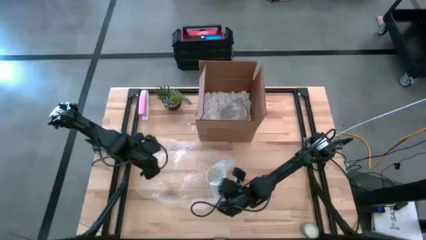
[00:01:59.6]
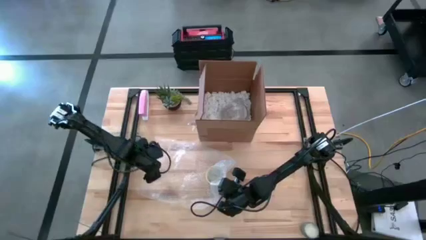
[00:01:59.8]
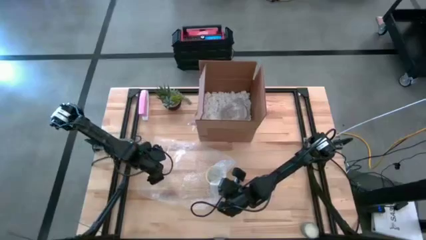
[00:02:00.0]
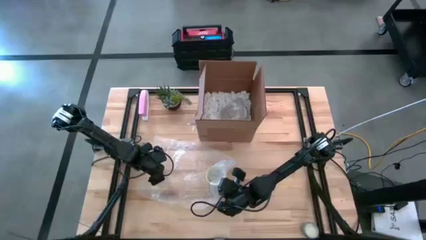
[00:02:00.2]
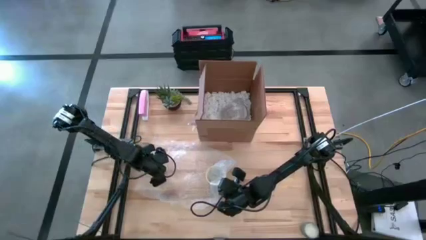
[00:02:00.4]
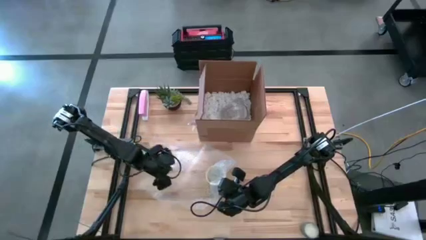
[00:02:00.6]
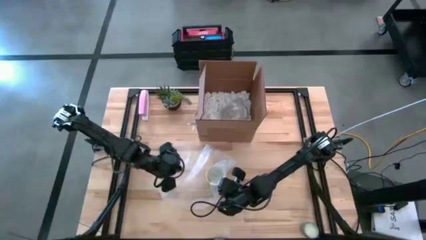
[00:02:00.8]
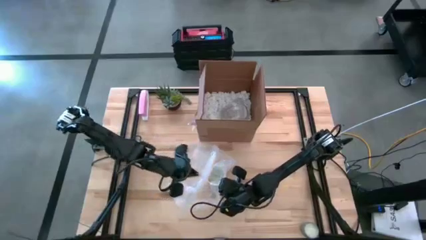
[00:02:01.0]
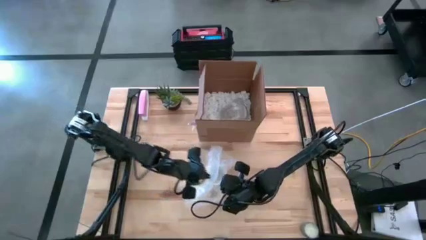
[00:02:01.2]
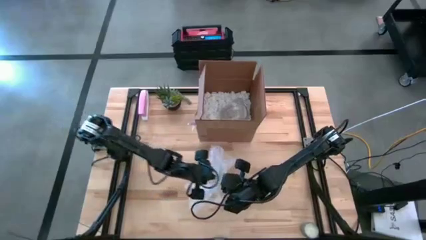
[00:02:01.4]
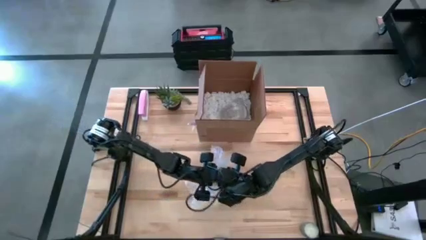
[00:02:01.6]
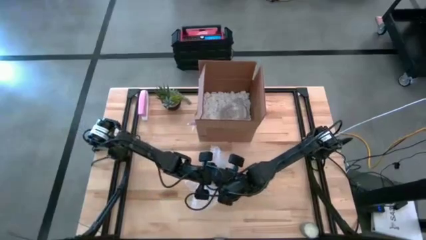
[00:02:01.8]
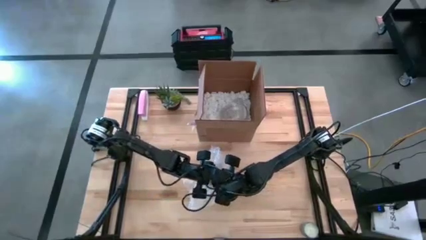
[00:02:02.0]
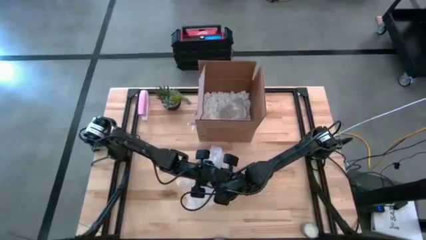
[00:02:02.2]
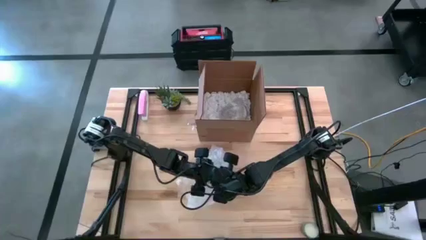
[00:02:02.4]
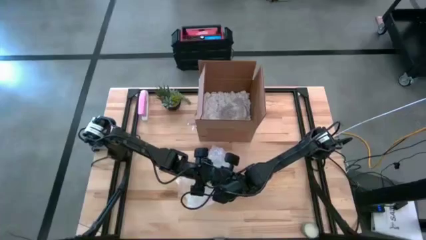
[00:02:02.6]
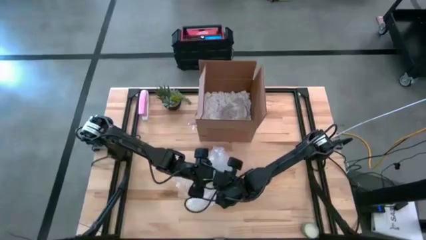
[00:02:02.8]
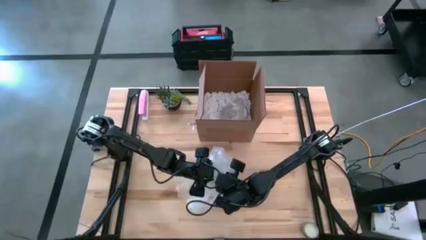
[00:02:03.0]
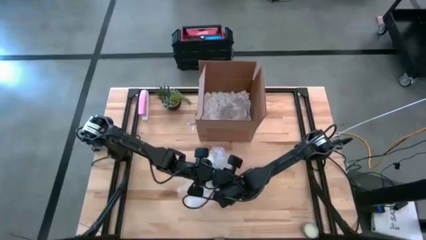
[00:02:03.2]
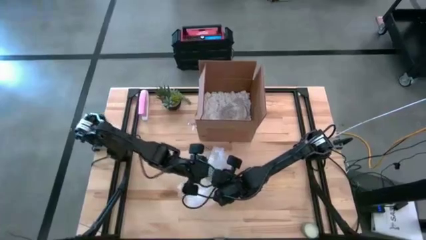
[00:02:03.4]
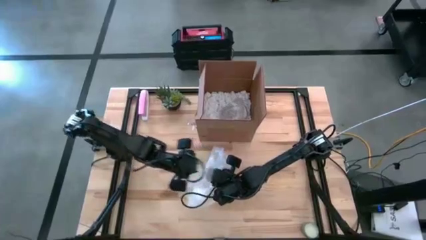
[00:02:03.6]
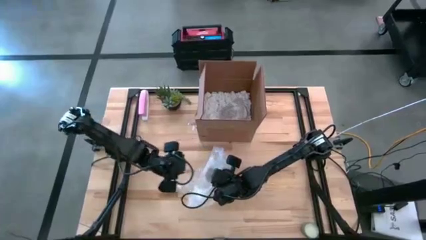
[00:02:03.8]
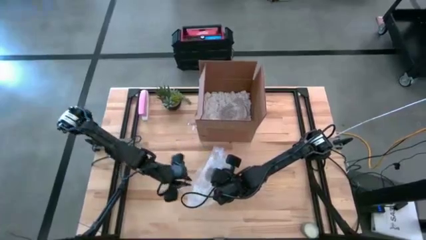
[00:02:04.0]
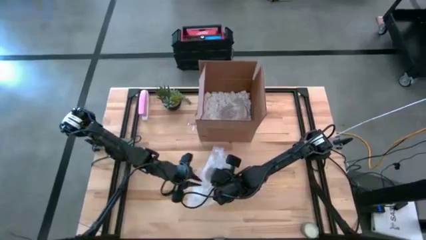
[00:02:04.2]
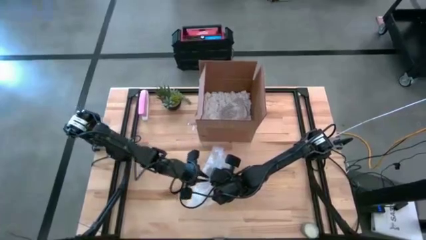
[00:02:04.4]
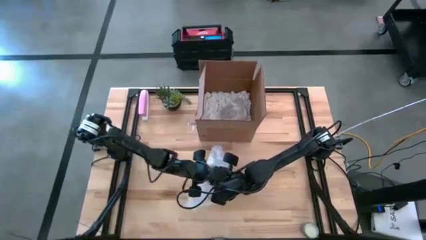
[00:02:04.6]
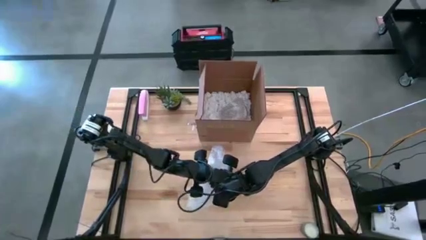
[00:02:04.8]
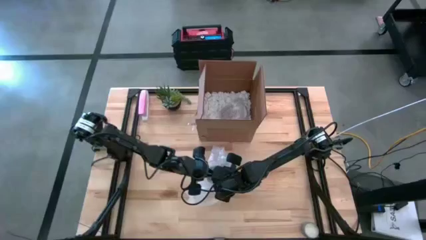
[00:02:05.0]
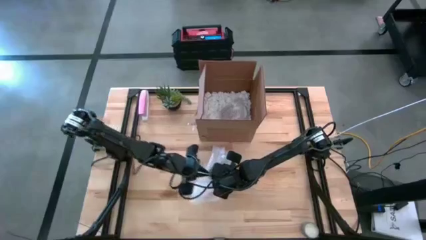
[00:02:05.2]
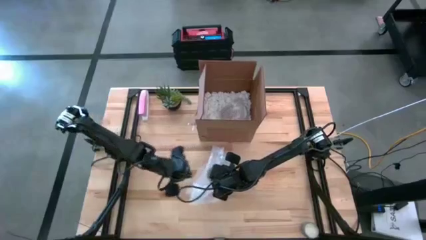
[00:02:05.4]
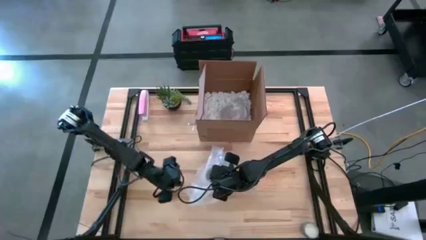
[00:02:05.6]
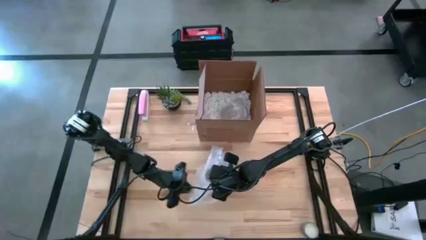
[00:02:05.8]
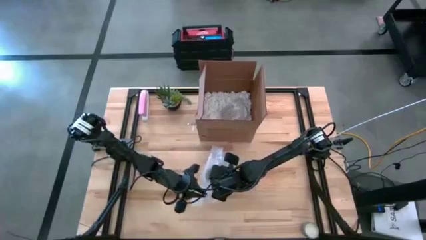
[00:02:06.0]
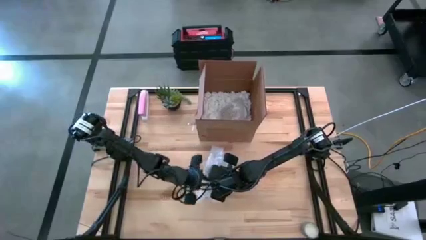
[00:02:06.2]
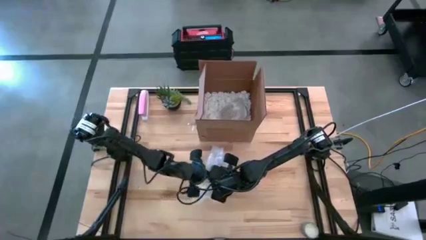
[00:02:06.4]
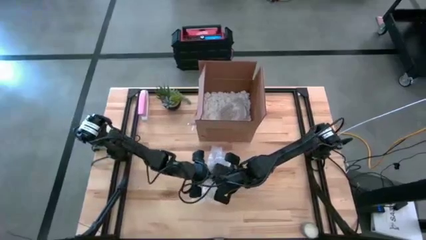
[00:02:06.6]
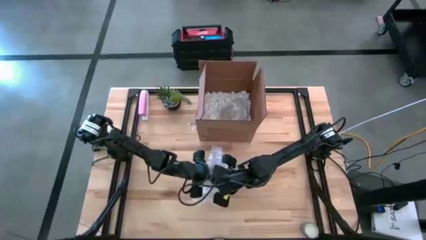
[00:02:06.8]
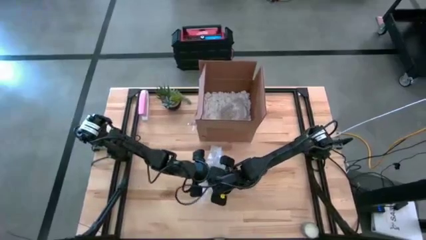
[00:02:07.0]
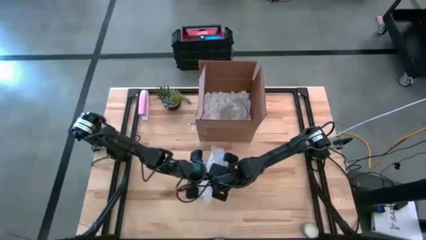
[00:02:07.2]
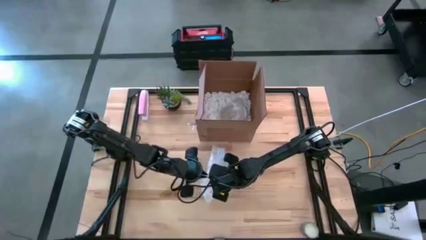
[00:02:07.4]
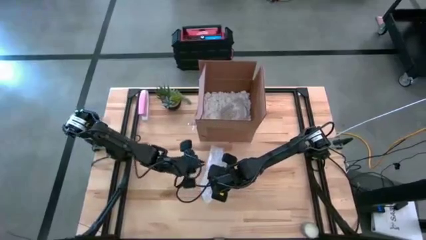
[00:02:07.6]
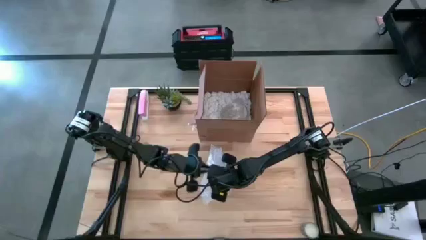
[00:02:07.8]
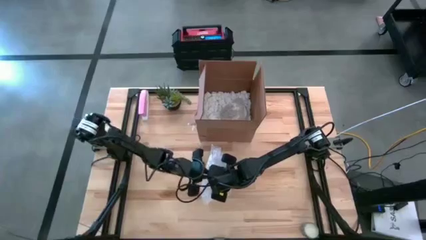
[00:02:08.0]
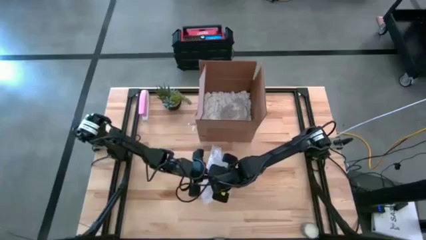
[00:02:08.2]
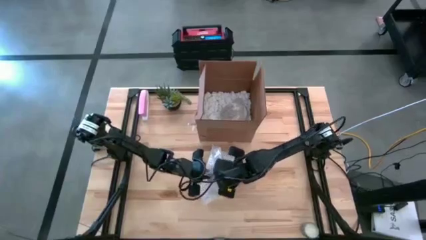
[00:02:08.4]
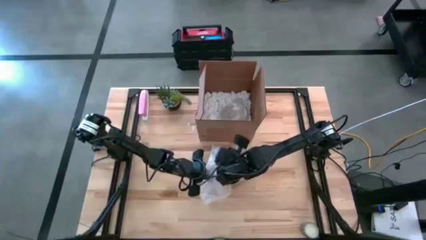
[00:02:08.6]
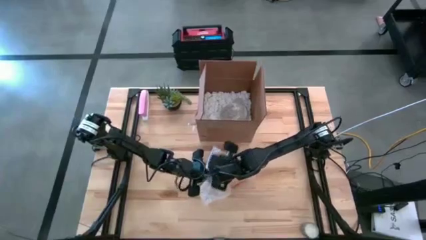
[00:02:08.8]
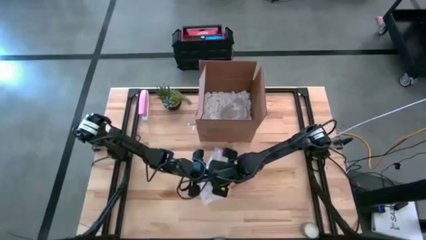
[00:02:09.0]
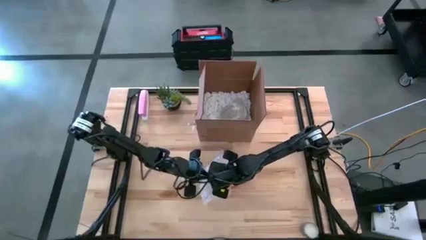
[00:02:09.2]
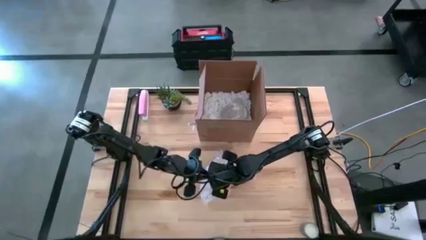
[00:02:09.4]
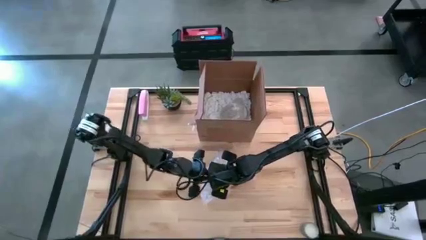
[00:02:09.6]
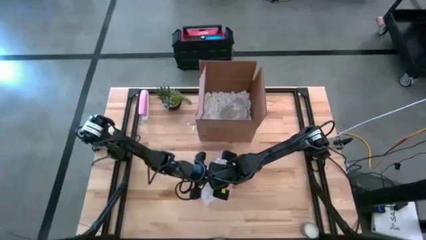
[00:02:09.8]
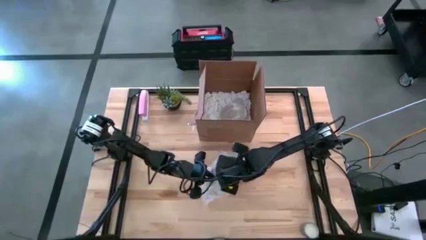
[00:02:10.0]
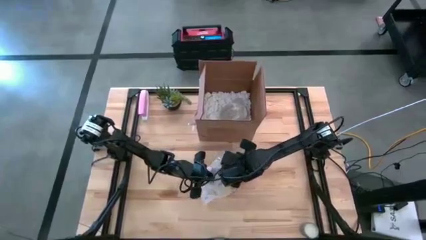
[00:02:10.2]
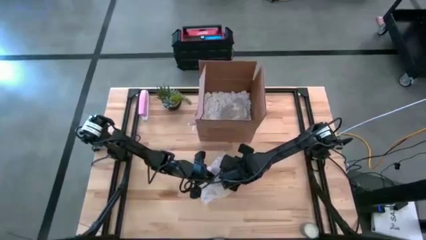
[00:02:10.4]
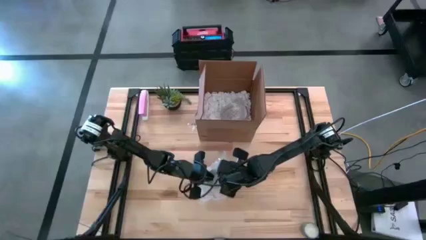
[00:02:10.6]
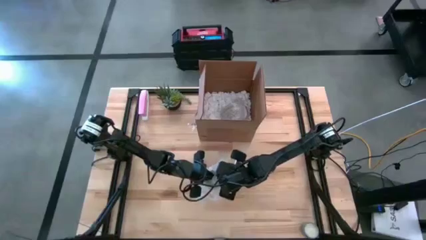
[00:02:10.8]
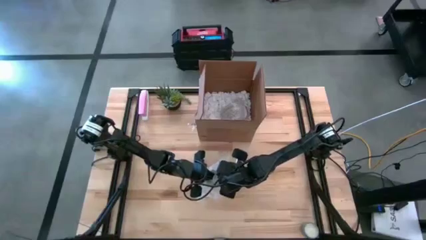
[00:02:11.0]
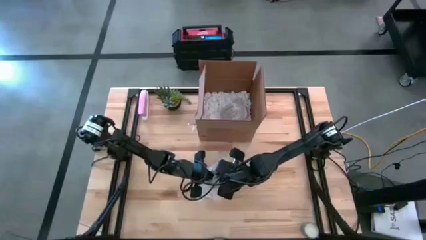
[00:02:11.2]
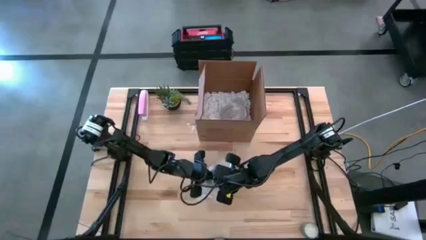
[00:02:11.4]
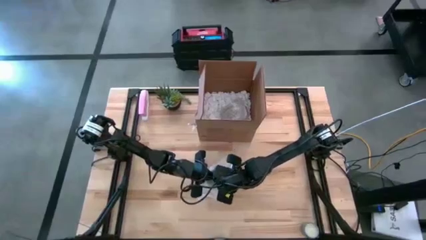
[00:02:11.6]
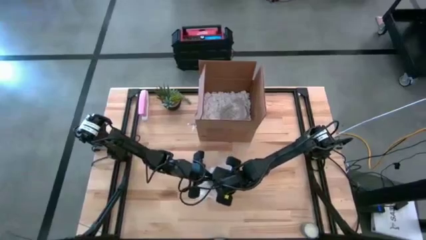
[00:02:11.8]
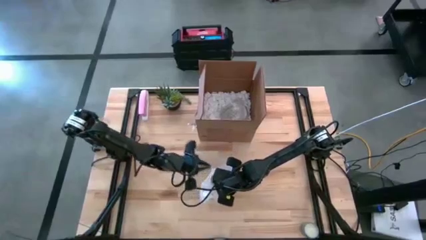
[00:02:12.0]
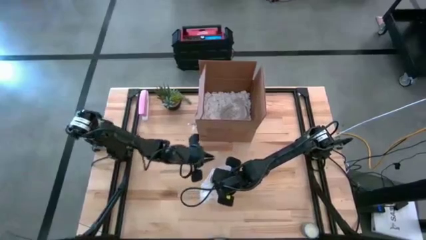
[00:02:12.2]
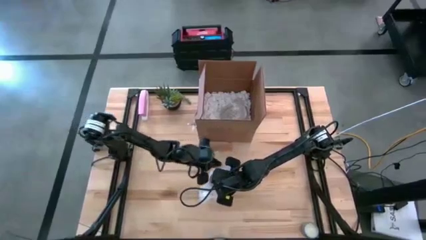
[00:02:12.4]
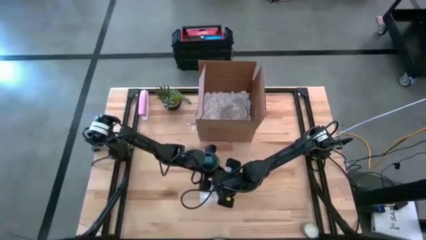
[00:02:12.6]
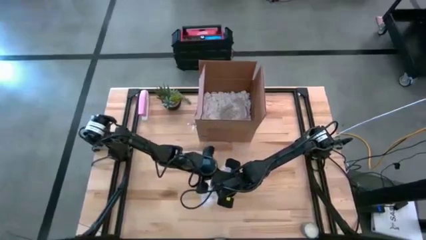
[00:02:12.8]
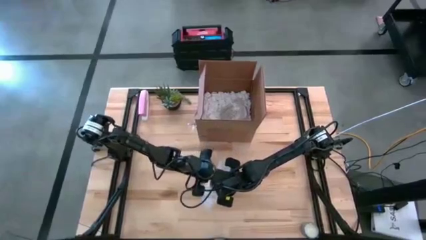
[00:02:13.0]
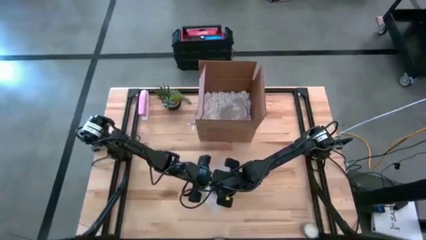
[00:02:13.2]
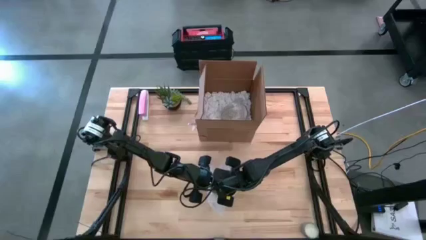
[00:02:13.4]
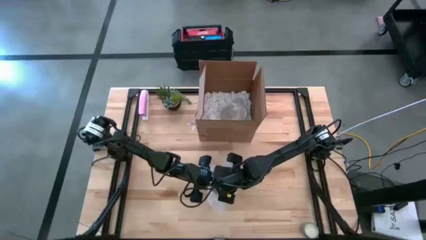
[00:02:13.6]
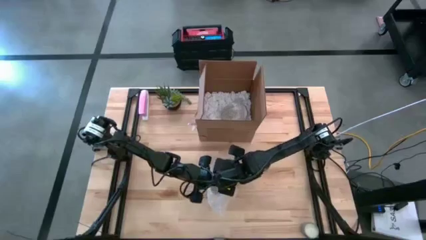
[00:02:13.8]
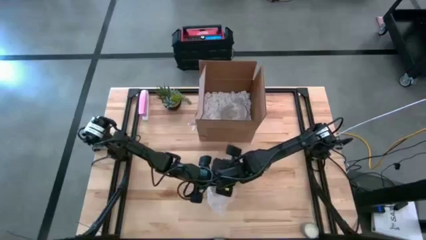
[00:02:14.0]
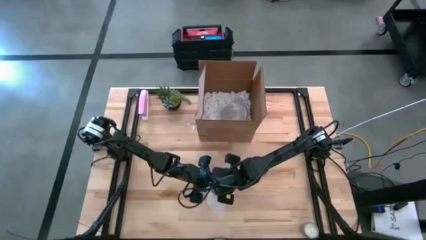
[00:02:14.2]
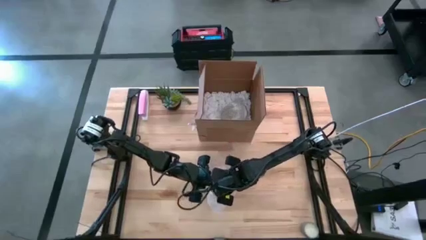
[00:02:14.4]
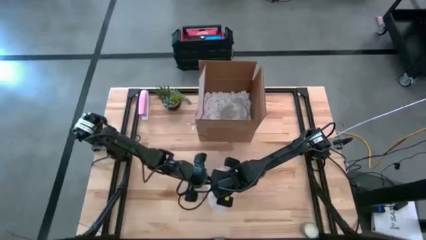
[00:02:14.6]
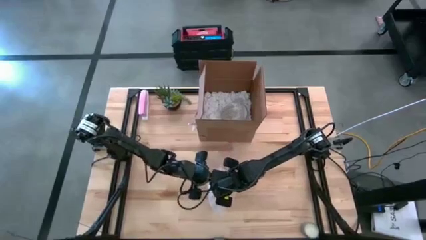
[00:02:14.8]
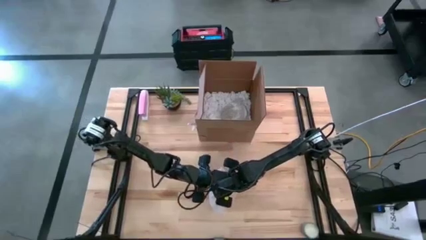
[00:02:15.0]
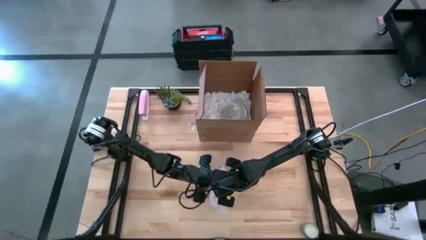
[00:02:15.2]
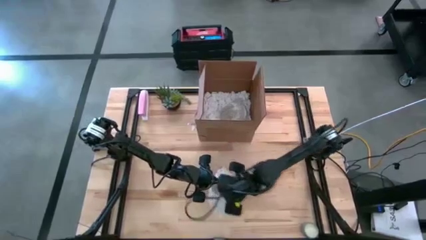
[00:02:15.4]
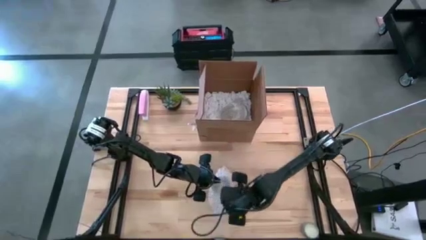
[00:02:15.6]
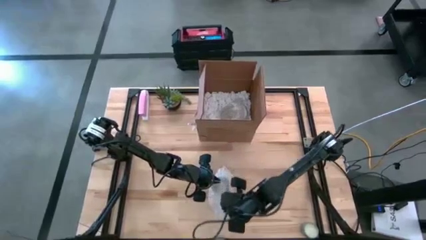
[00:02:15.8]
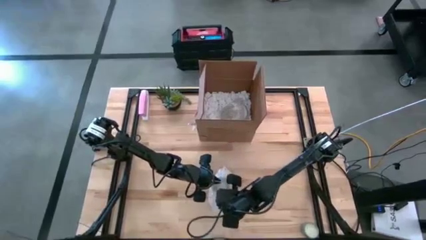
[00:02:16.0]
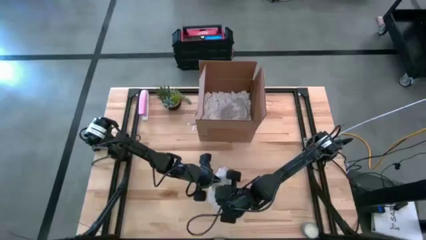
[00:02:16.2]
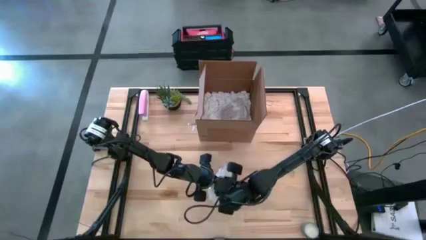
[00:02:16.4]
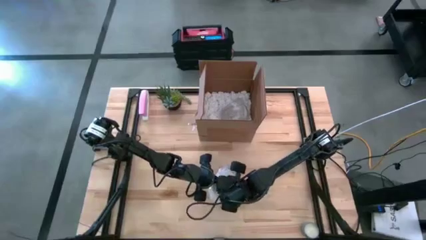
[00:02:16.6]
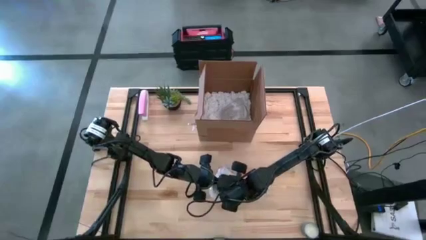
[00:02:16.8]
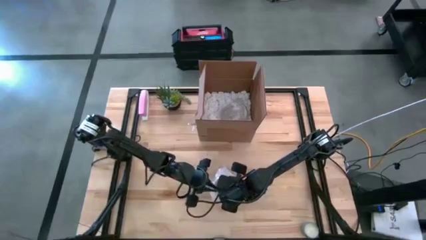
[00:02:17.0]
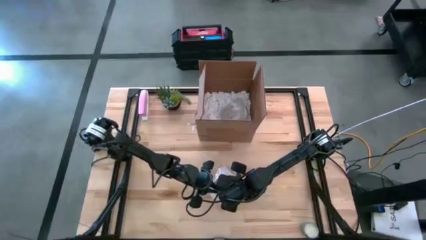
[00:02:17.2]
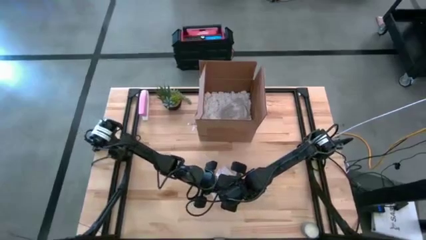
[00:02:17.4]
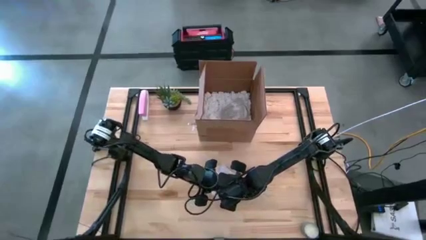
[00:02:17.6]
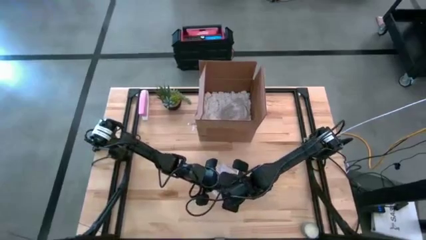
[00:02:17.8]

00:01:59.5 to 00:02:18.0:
Task: wrap mug
Wrap the orange mug with bubble wrap
